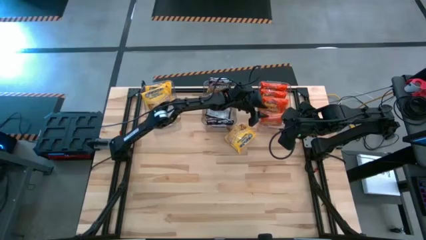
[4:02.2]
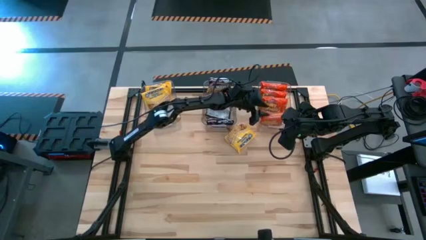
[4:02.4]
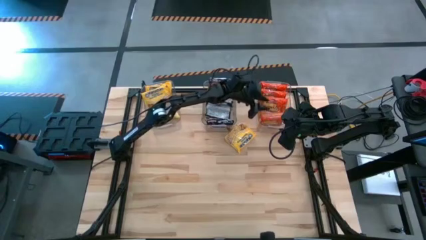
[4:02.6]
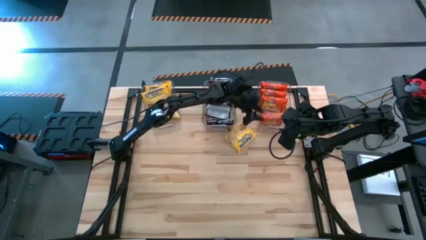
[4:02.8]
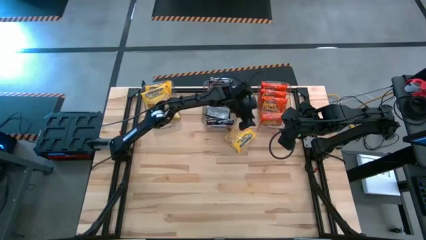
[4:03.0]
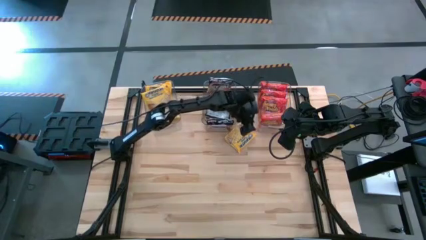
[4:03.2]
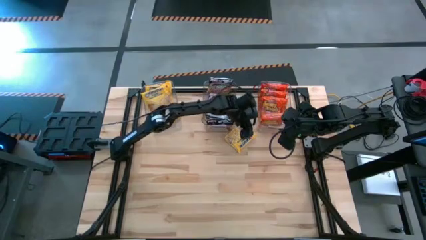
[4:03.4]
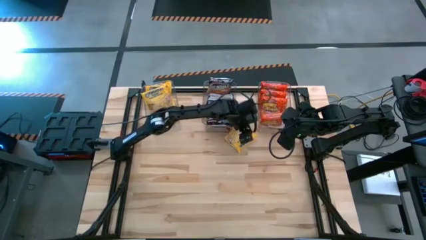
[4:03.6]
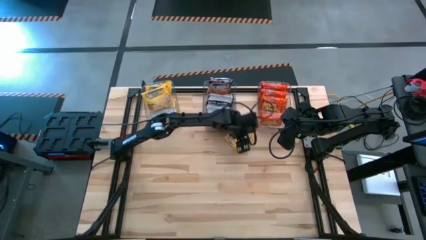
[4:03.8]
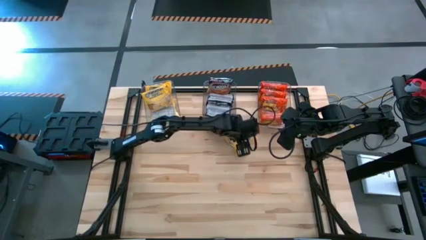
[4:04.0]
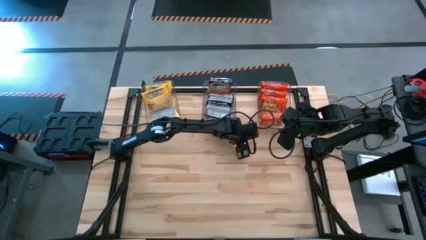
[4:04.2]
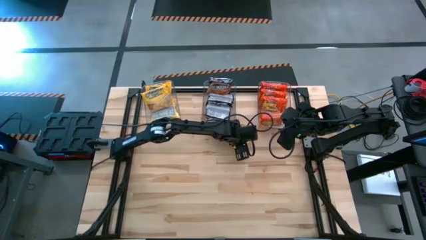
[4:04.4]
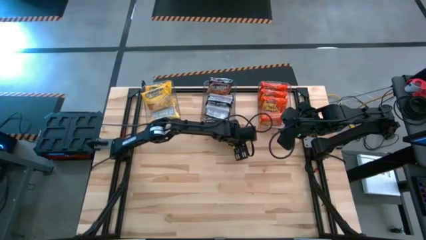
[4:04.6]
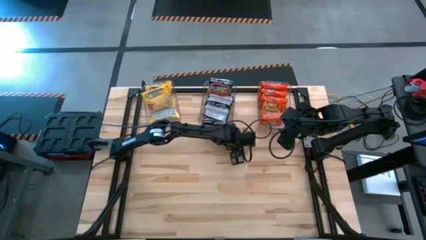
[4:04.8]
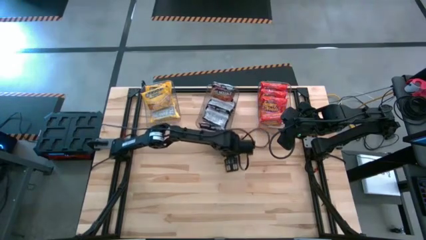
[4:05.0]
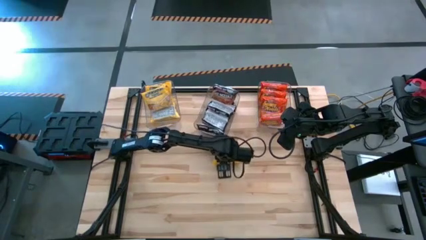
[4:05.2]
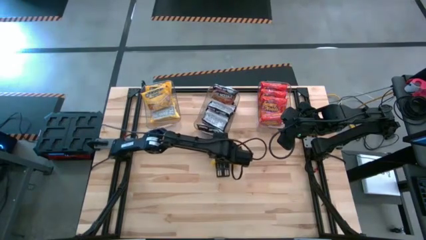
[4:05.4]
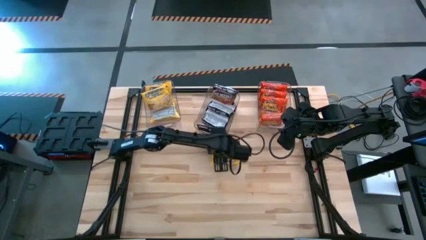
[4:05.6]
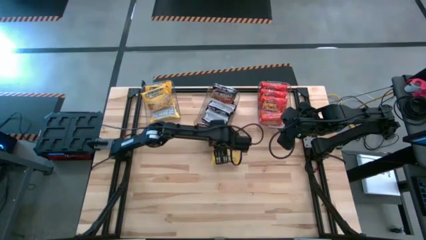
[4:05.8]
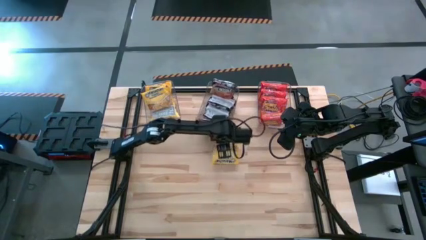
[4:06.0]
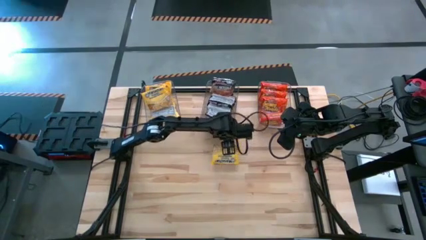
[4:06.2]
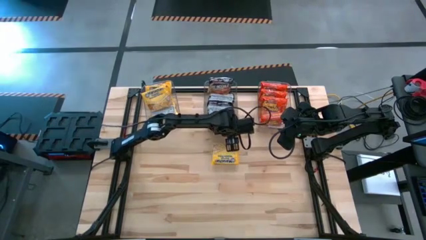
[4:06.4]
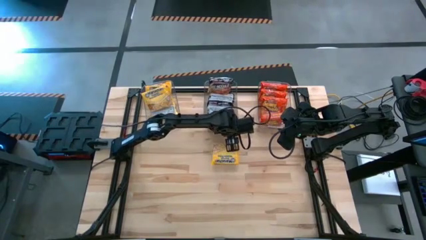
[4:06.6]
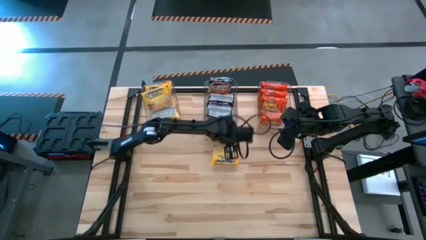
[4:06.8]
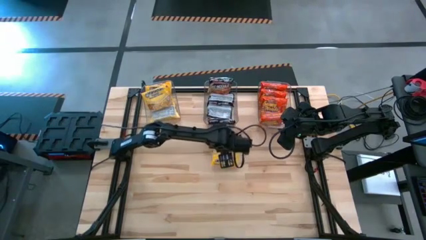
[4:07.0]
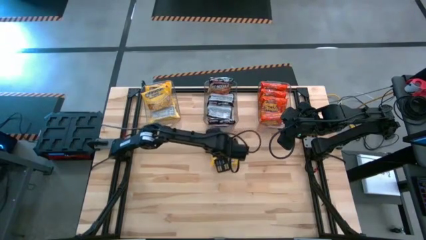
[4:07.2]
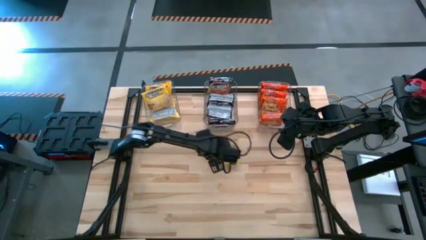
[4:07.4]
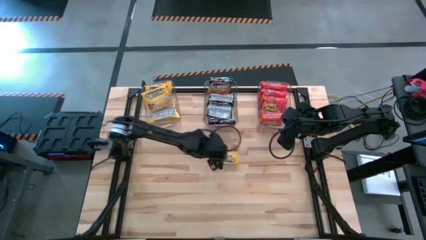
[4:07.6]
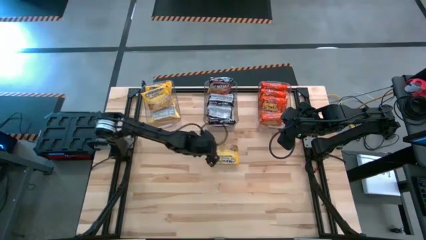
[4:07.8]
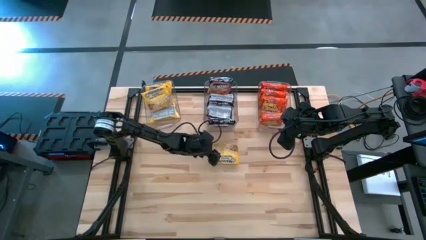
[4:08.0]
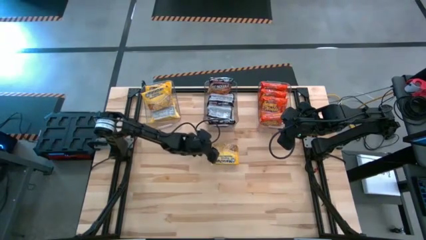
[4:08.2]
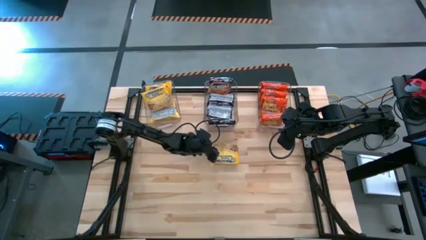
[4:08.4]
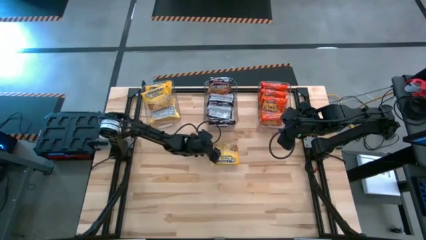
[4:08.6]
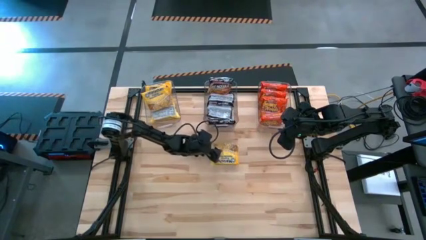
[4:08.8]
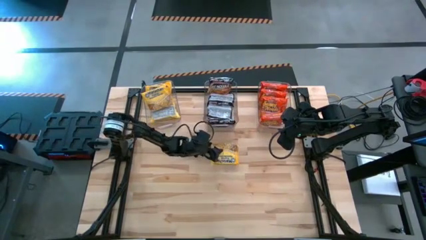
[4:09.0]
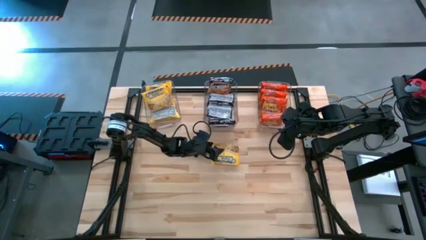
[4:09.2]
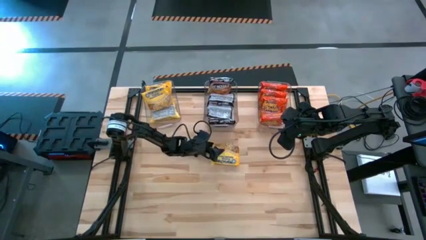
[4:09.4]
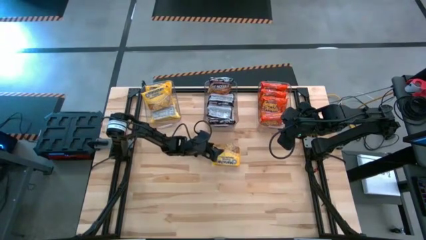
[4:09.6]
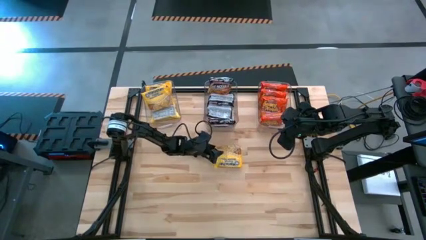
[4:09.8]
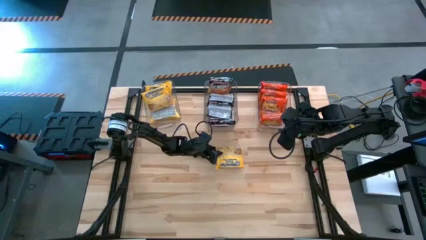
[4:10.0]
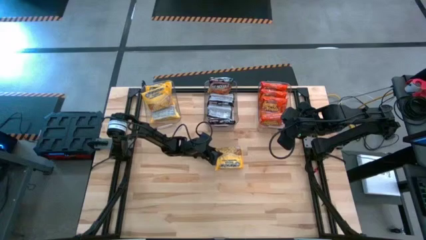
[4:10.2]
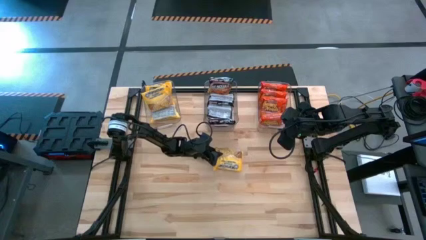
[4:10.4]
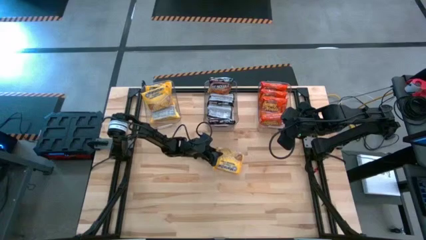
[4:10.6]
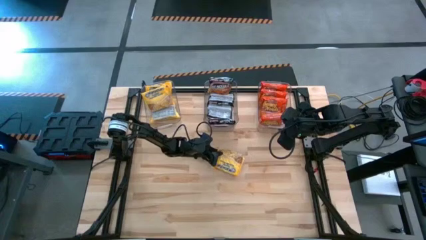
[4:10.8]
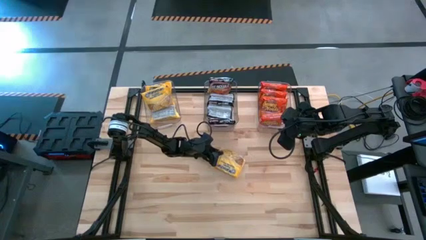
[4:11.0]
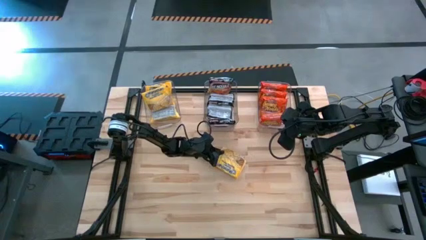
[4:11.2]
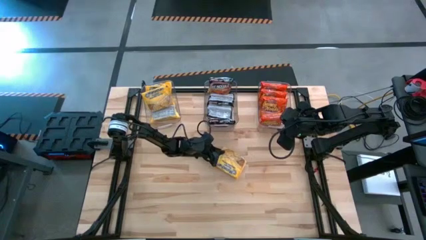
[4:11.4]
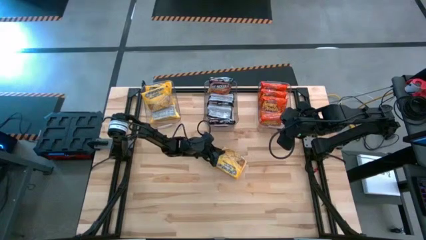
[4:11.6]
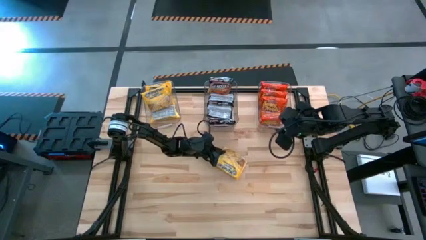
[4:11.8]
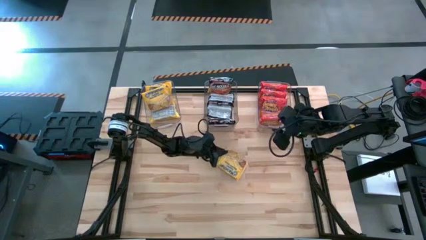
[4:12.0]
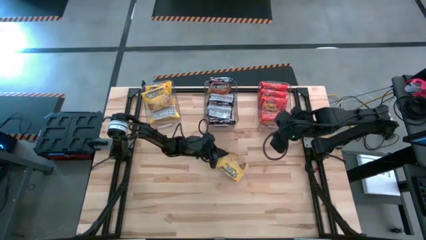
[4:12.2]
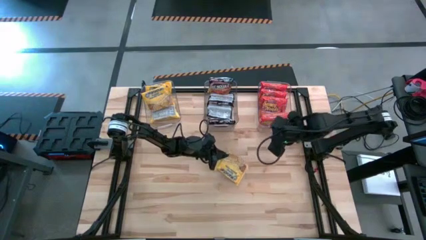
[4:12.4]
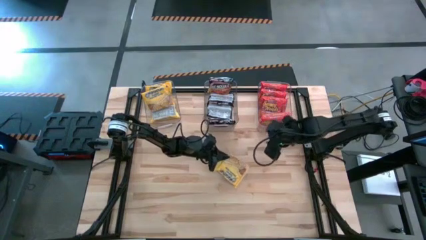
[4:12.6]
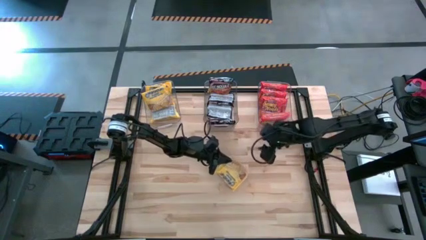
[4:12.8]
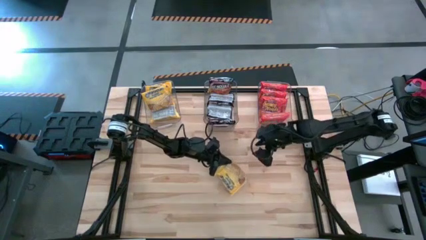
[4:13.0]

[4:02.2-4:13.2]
Task: Sort Maruchan noodles
Put the yellow noodle pack into the left transparent bin
